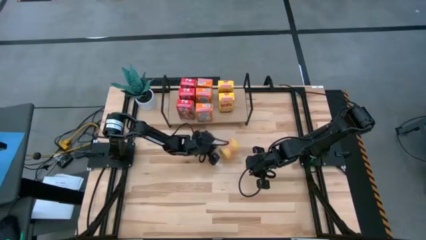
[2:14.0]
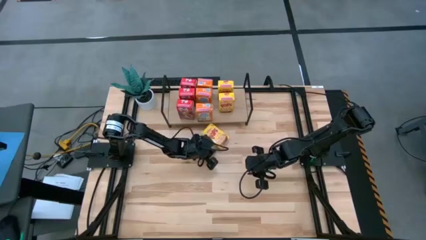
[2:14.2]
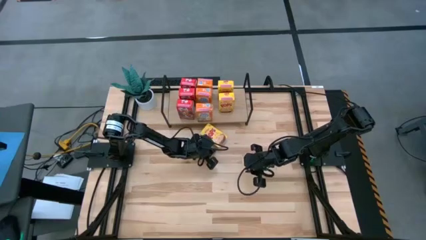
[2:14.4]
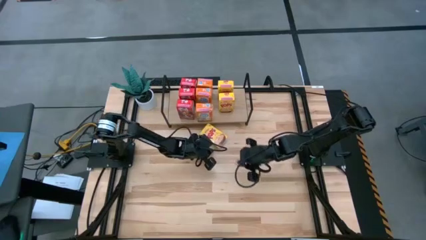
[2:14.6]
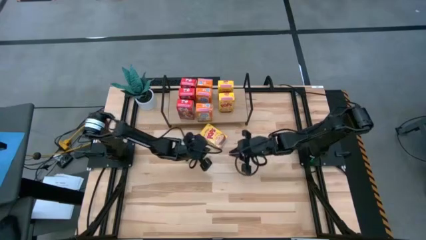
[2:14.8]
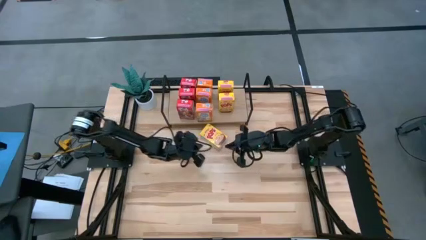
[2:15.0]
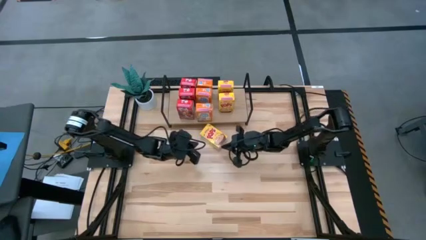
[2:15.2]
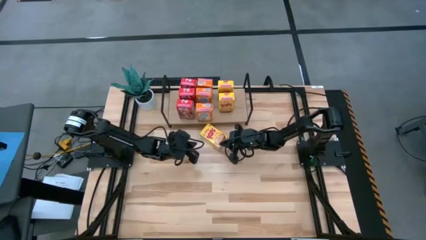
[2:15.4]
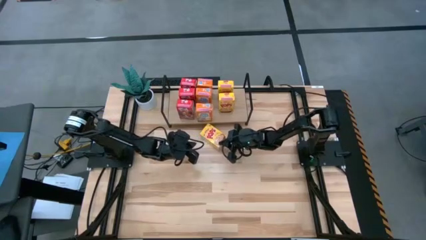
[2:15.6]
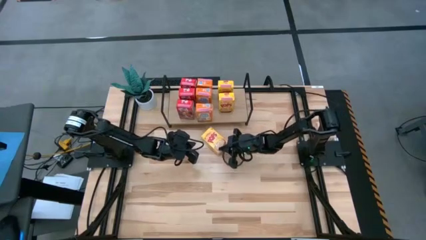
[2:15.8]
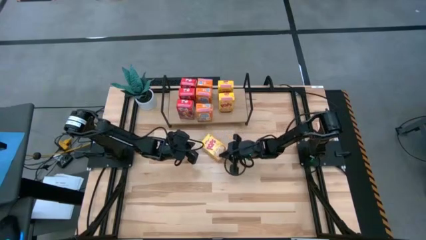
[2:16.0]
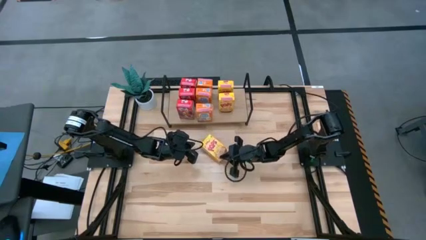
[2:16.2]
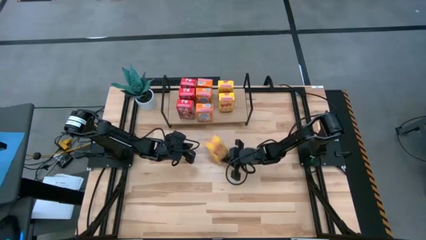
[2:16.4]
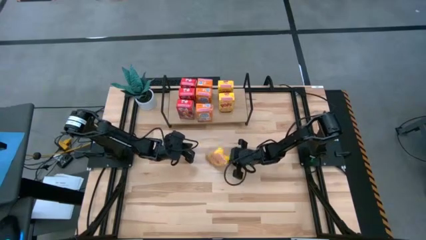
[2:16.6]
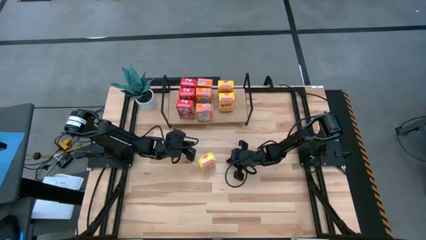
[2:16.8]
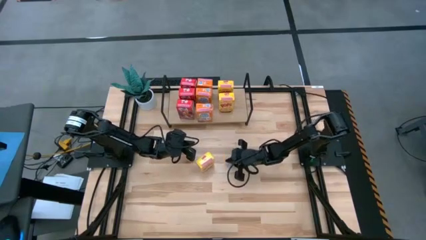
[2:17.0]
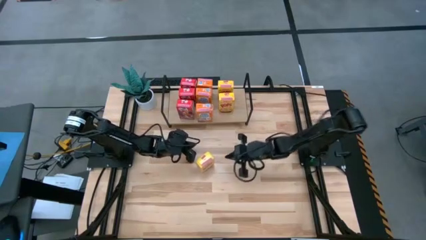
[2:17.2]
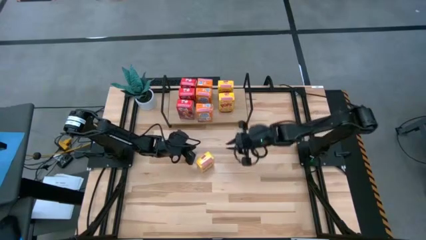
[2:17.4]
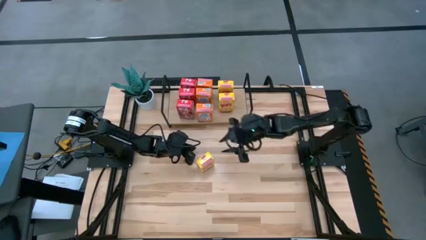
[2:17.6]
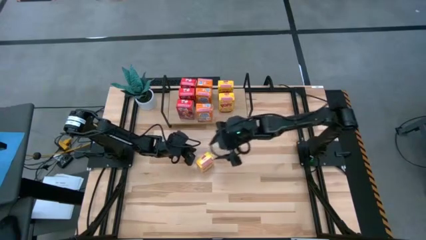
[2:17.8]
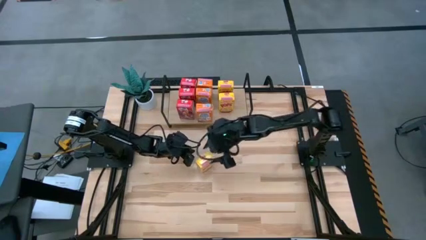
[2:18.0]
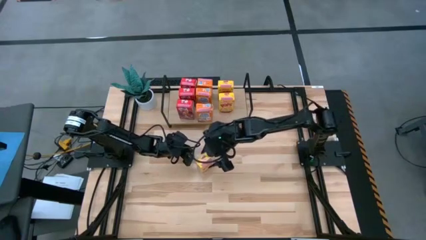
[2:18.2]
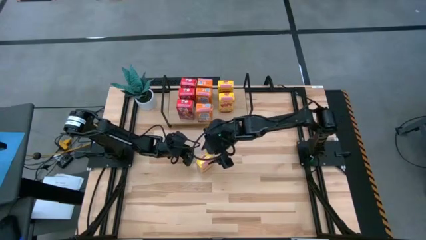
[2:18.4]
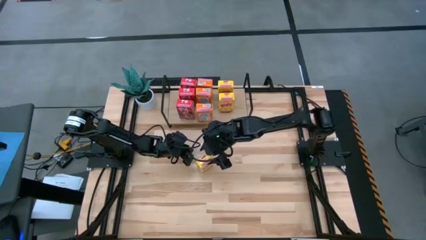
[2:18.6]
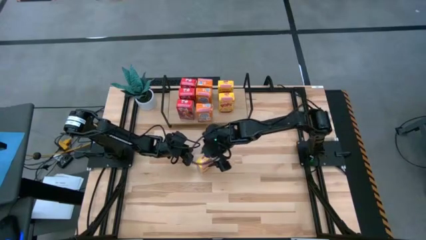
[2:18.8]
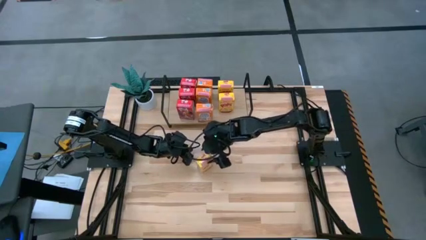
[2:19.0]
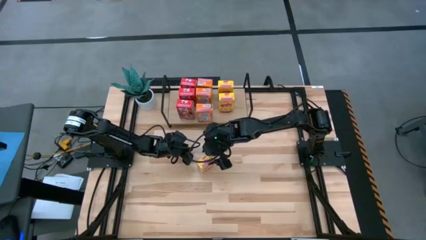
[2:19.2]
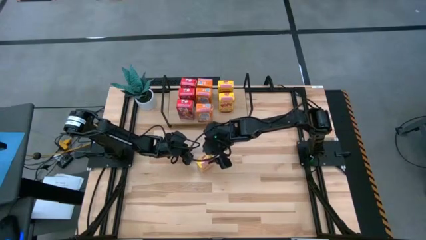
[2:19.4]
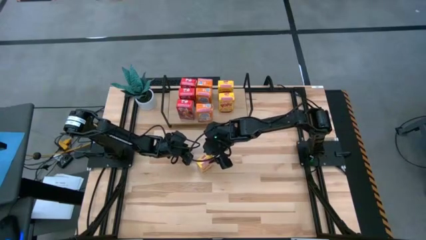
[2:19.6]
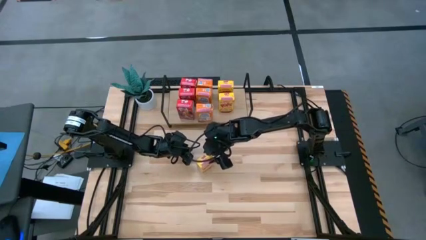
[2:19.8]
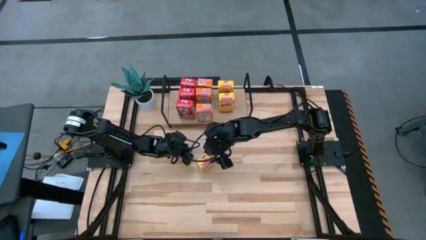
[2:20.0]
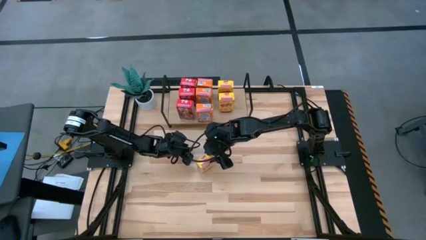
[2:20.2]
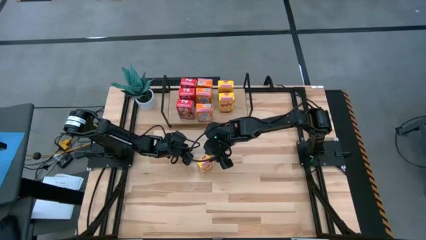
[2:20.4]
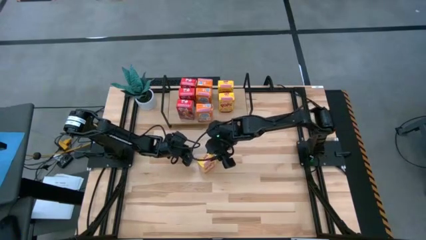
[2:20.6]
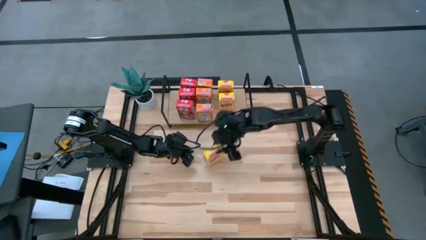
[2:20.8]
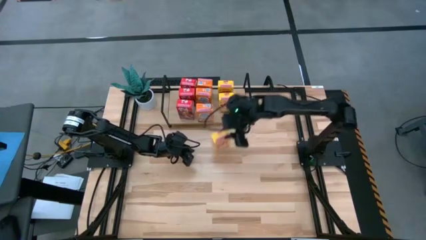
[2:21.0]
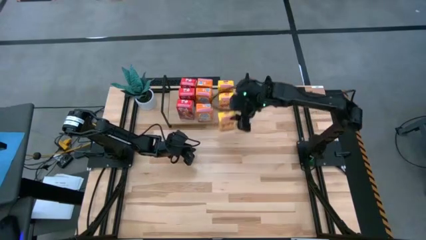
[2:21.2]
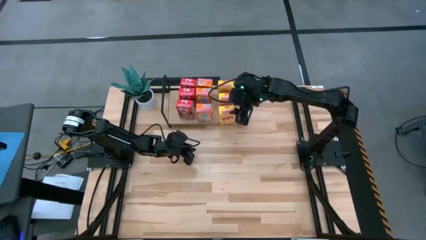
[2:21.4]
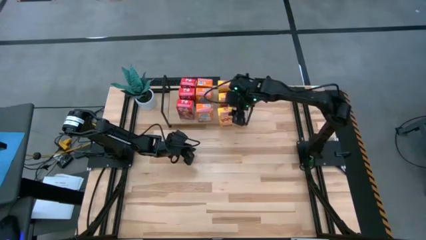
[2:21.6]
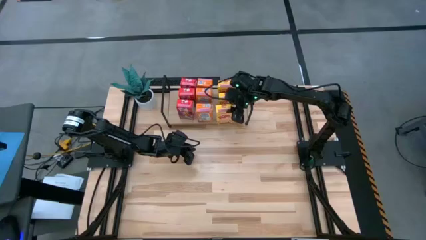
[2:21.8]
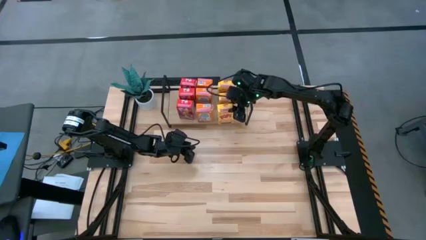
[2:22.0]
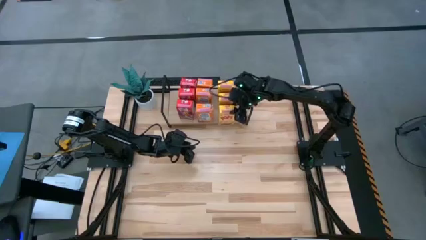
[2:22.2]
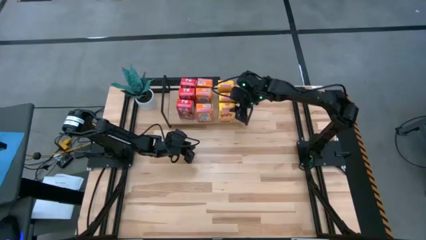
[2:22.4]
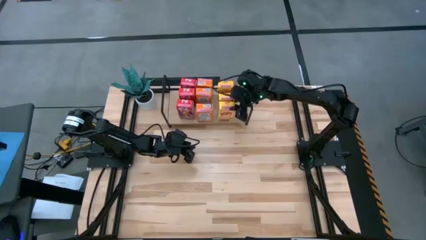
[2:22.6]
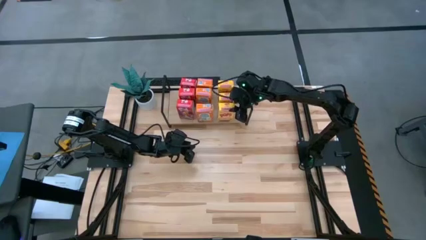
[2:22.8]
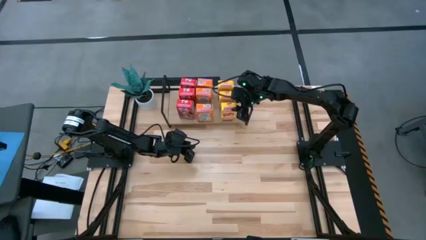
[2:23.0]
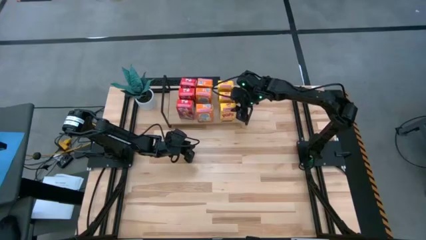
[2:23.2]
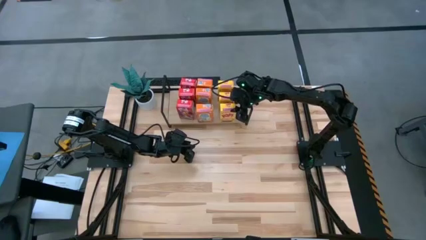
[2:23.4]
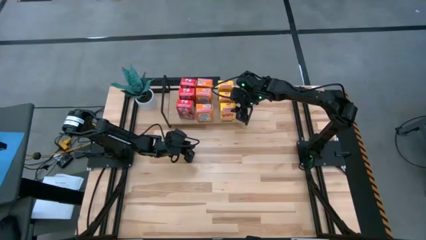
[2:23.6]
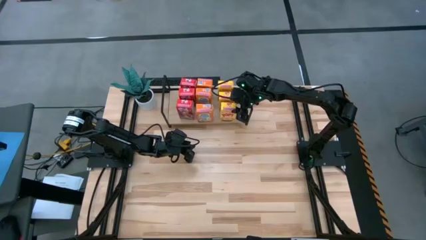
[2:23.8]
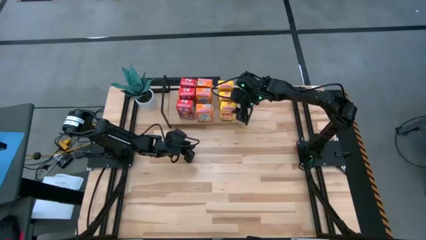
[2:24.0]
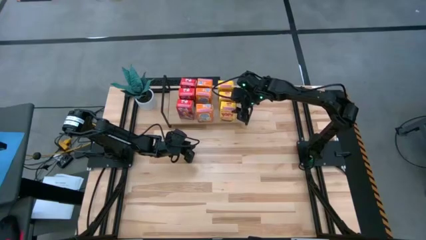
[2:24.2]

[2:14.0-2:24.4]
Task: Stack cereal on shelf
Put the yellow cereal box on the shelf aligned with the other yellow cereal boxes

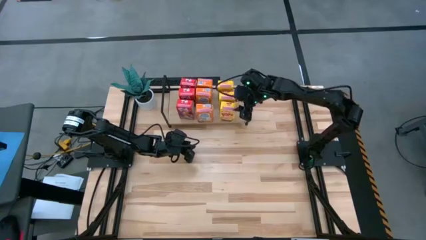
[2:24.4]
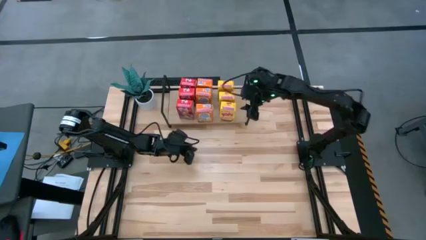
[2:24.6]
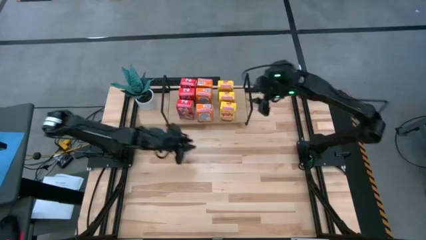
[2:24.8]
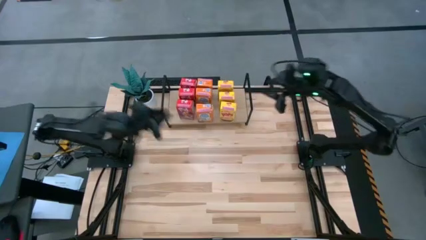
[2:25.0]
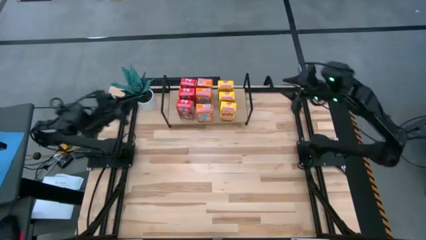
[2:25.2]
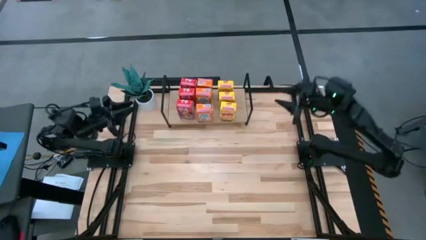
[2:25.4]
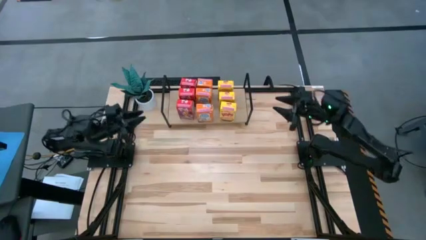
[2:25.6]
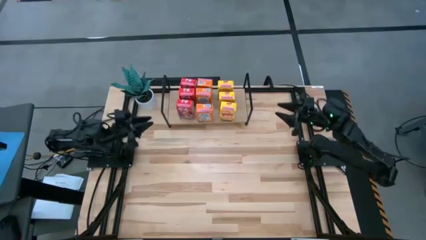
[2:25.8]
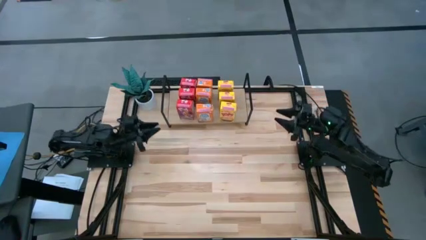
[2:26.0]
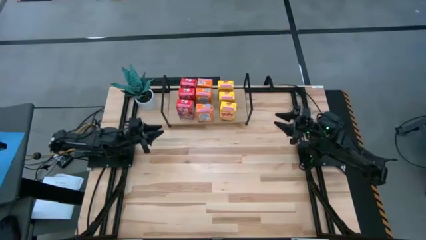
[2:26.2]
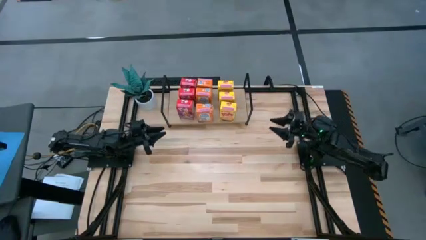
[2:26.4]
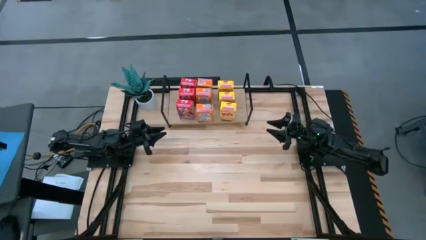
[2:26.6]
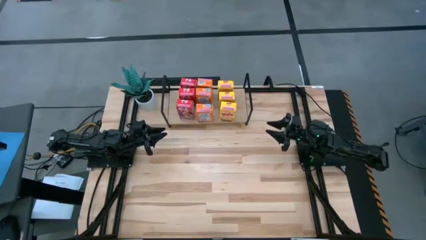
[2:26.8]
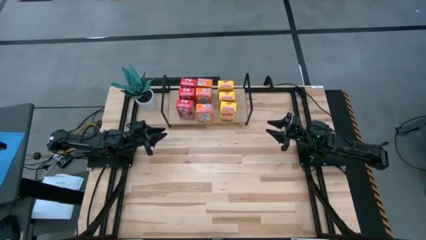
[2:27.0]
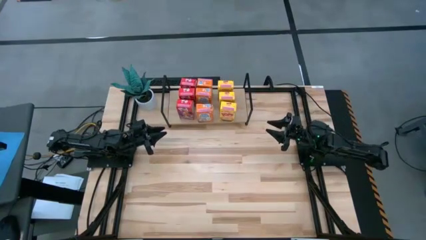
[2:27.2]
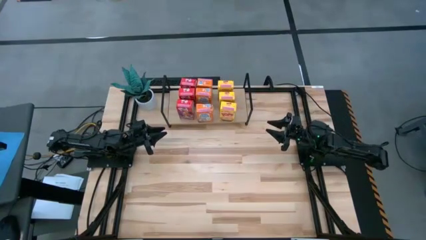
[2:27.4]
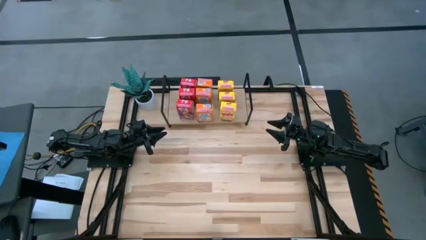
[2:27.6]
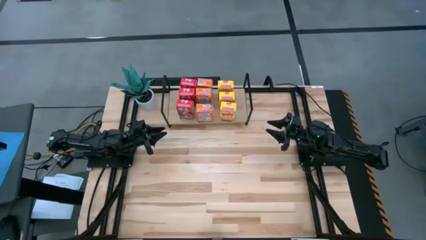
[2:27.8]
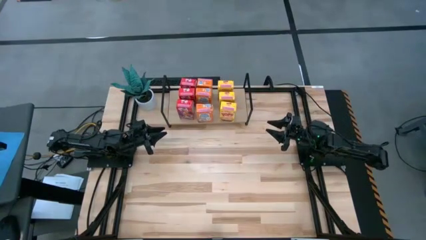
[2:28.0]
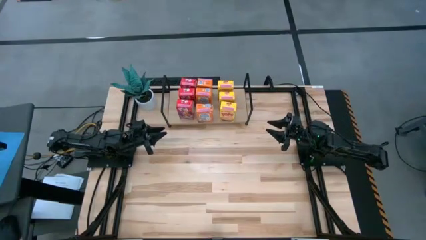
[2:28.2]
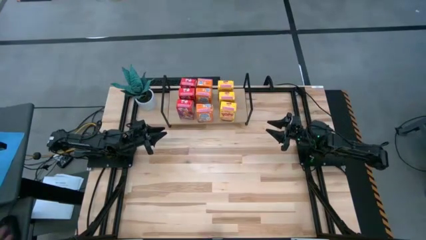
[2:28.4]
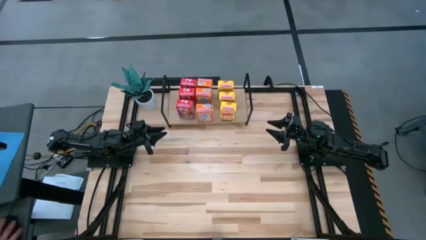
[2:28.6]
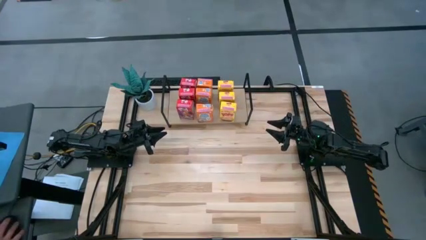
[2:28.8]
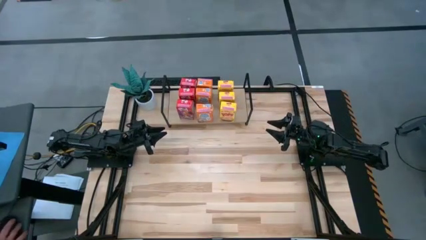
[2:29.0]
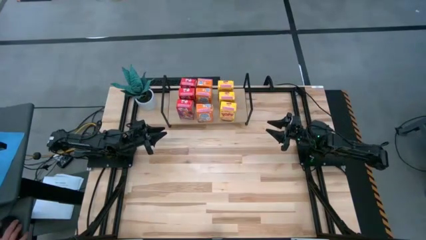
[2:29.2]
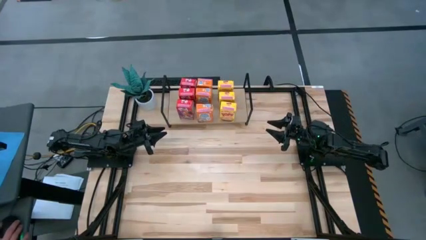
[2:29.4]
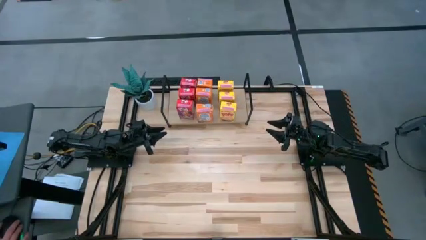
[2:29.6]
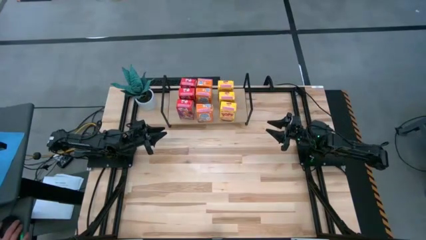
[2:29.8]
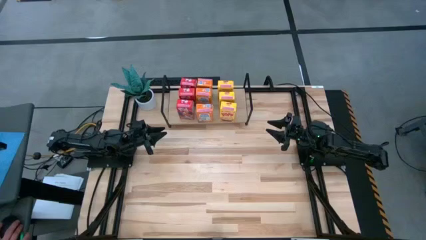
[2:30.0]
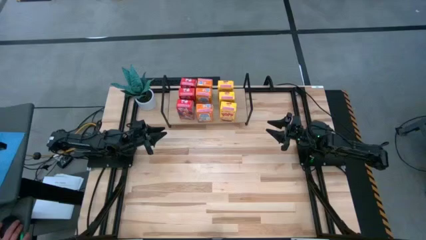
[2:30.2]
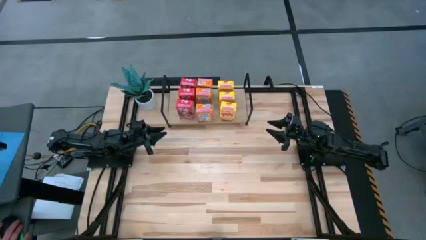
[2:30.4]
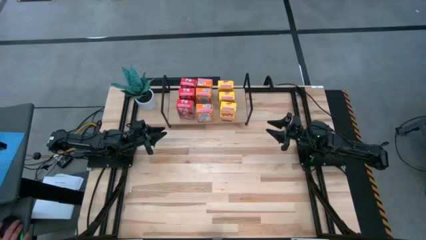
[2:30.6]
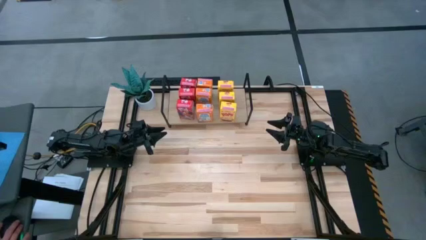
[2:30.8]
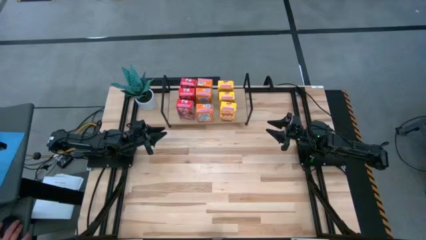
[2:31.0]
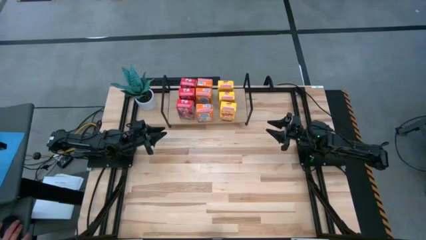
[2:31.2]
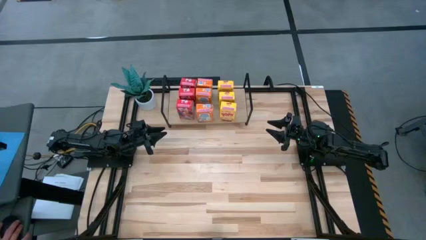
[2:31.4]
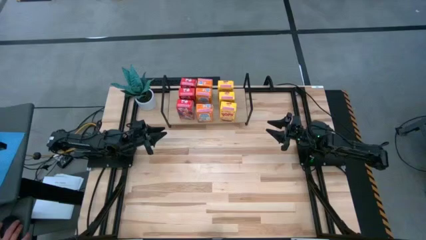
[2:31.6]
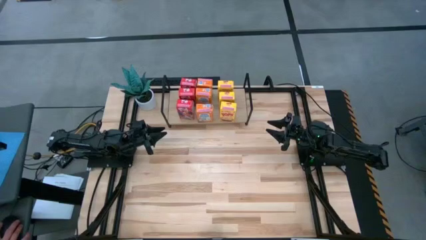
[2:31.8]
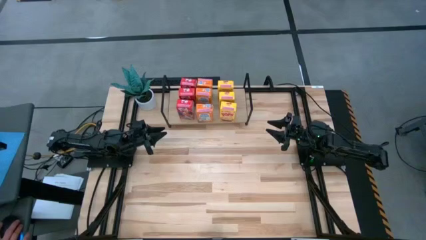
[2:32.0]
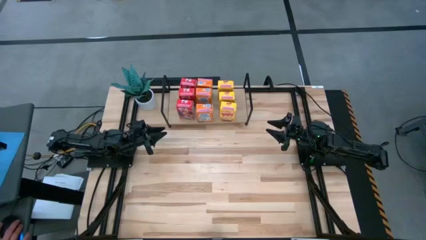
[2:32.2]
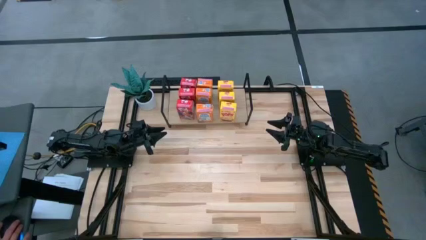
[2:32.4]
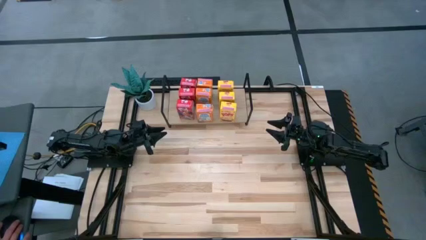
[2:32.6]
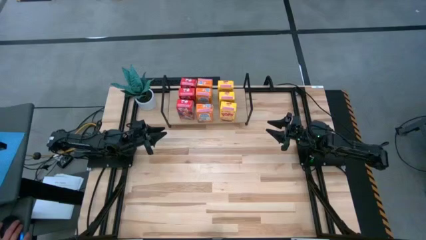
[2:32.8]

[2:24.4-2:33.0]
Return to Home Position
